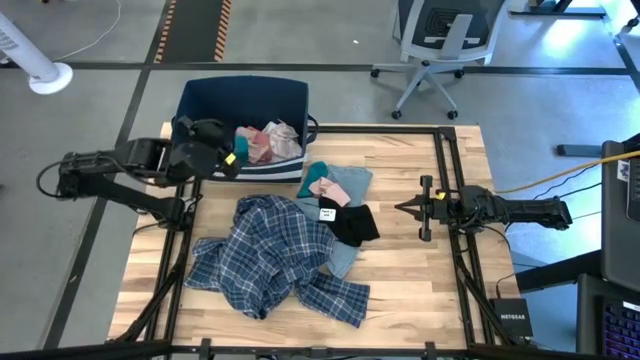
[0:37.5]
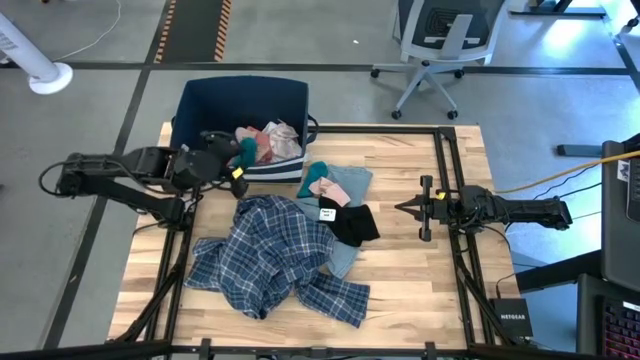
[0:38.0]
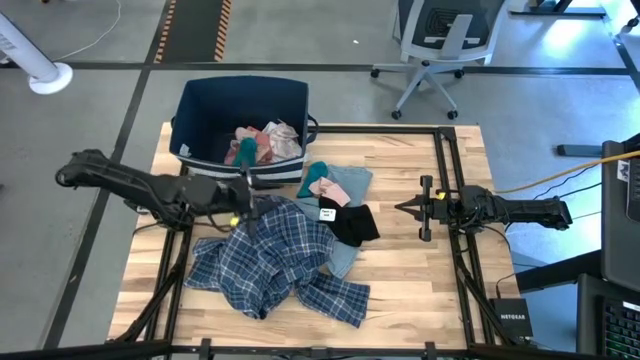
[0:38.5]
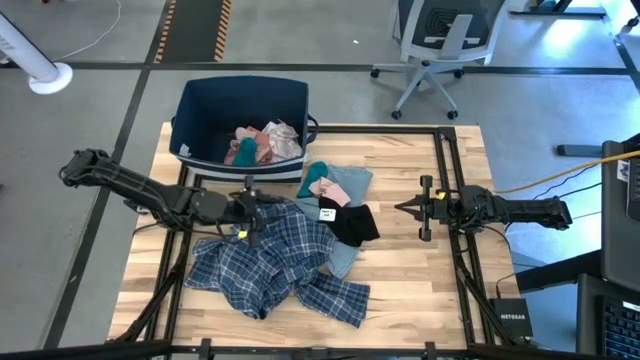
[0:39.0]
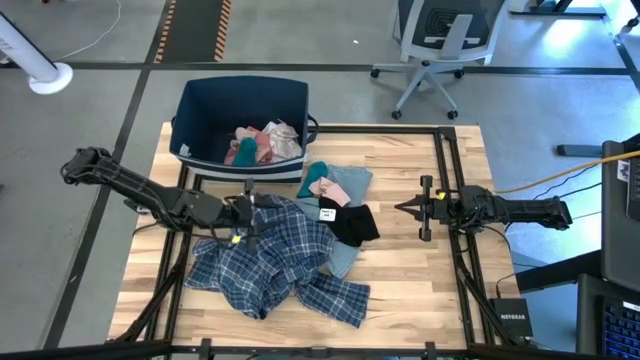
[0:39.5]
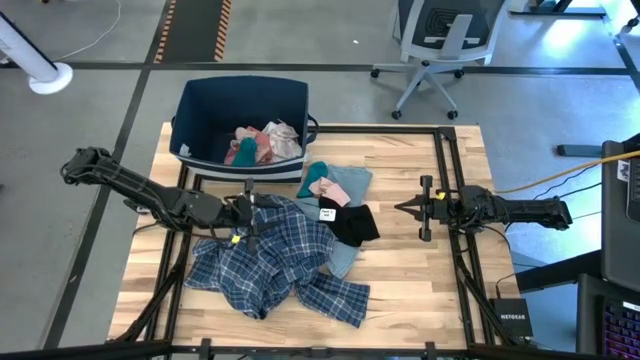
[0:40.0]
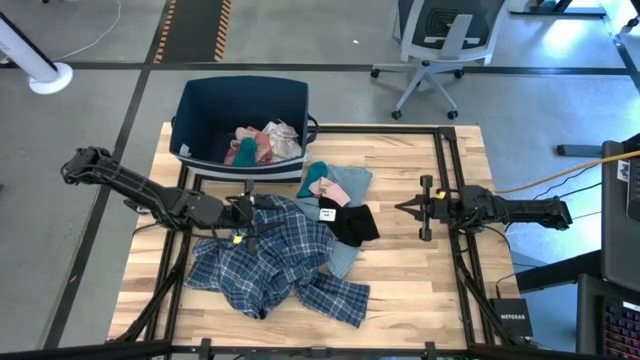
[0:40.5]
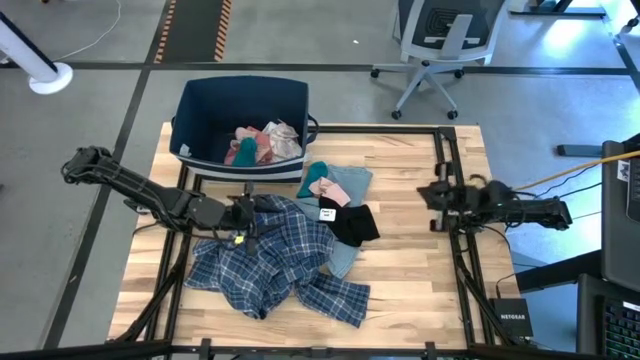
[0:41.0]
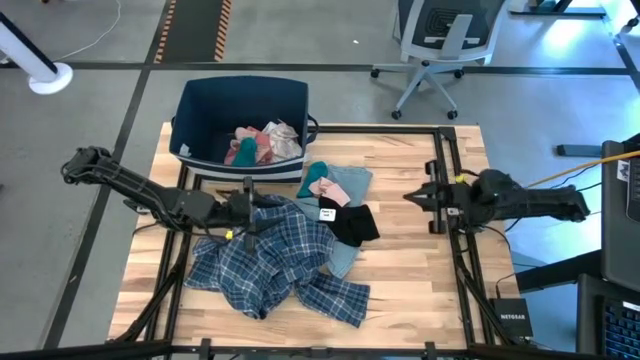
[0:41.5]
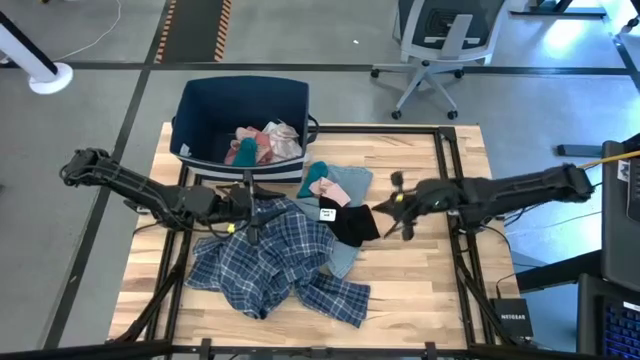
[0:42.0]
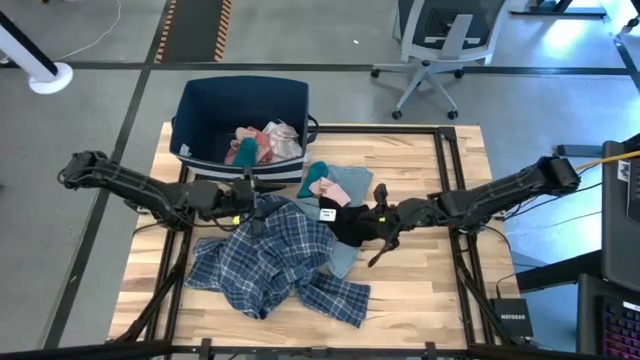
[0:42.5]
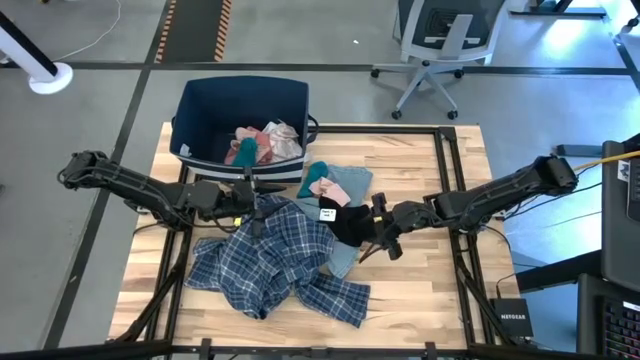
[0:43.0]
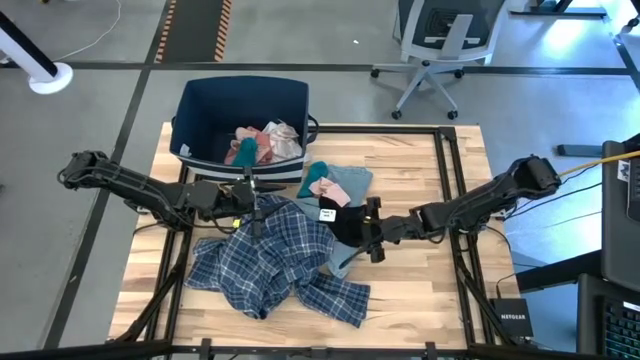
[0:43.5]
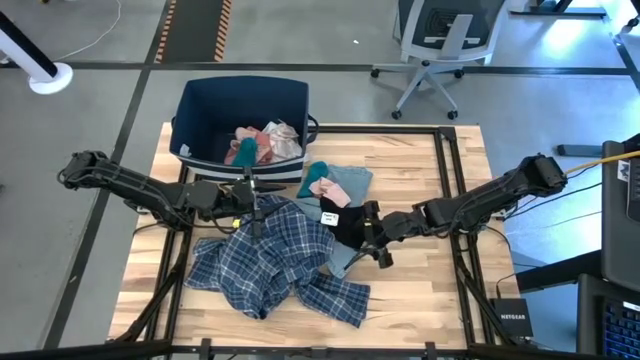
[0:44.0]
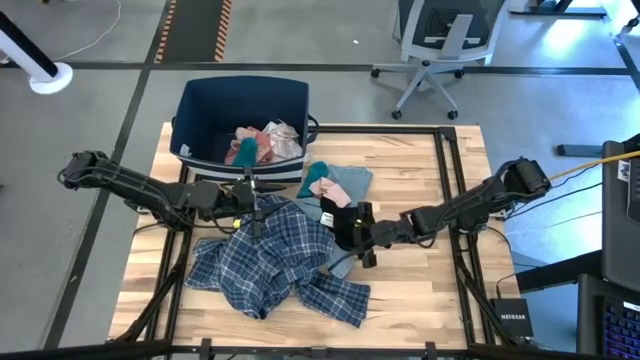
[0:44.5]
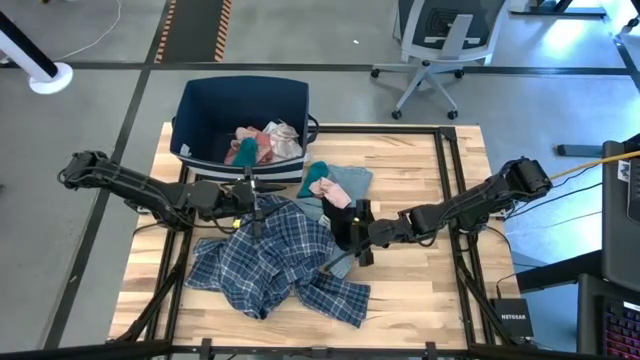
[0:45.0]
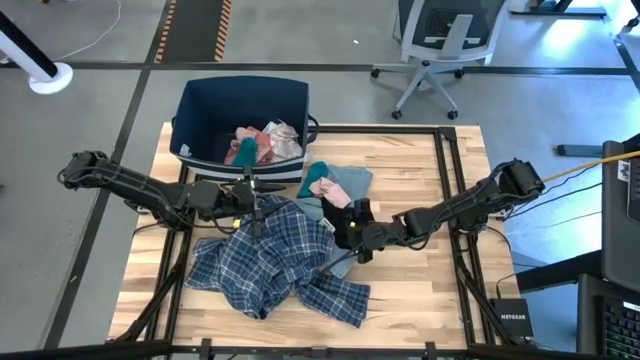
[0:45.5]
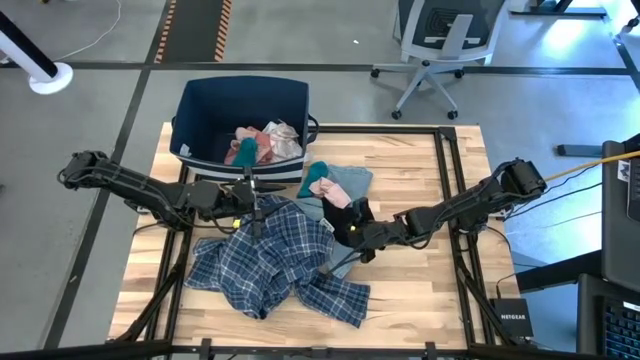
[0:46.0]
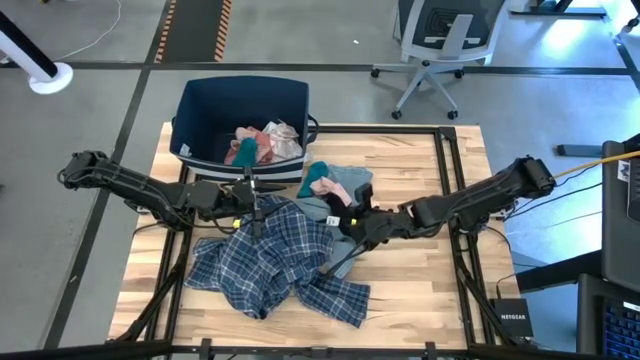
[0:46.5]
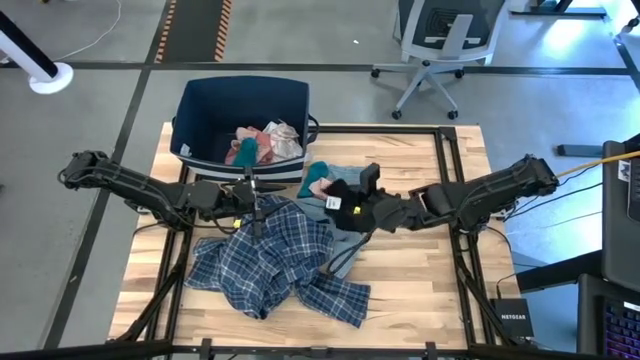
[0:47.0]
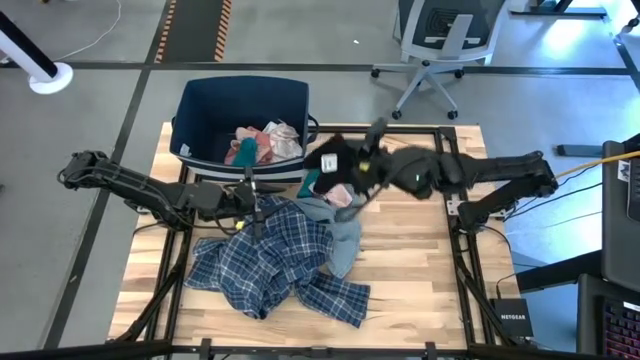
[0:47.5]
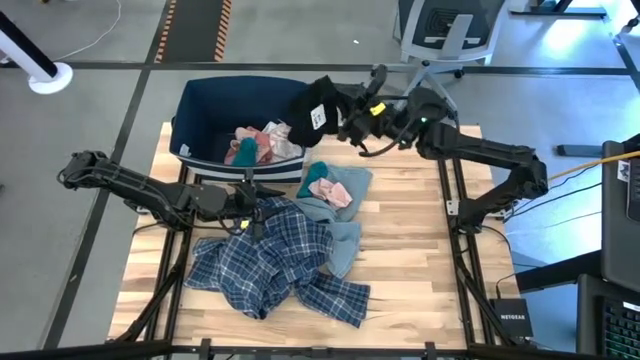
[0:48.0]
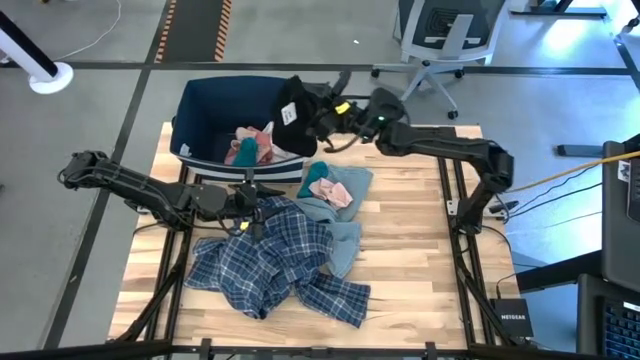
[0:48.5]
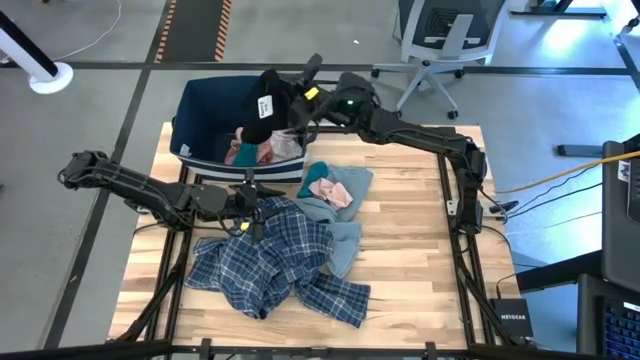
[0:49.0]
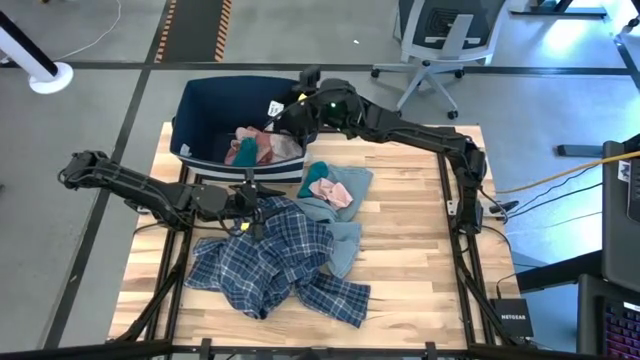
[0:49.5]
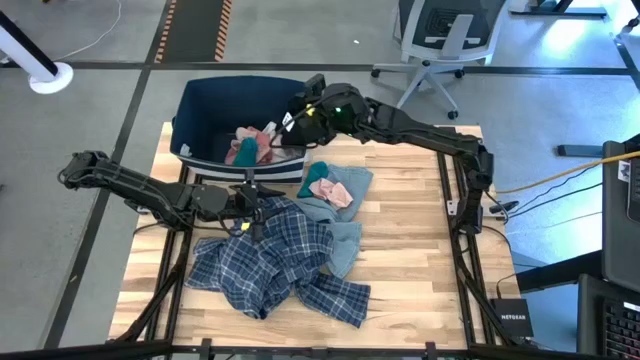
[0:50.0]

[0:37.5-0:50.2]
Task: Sort clothes
Put the black short pants into the blue laundry bin

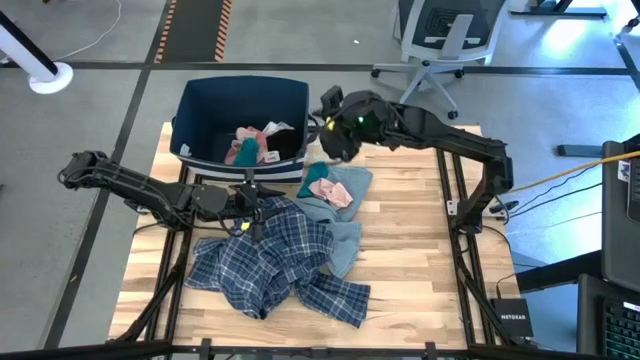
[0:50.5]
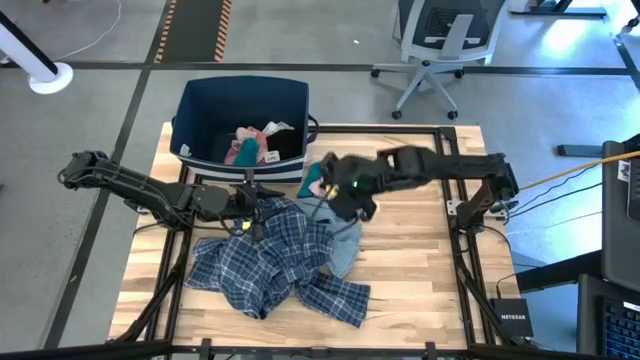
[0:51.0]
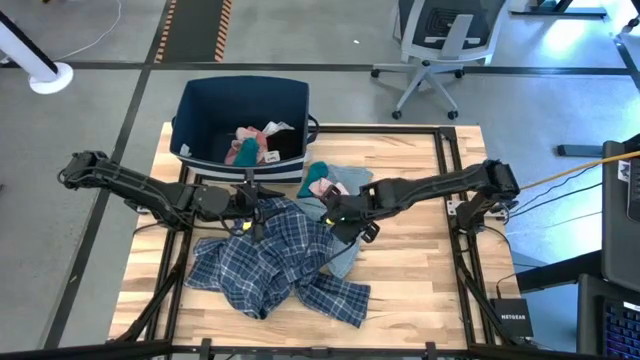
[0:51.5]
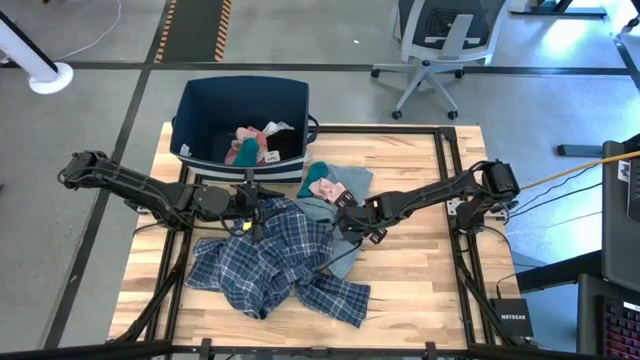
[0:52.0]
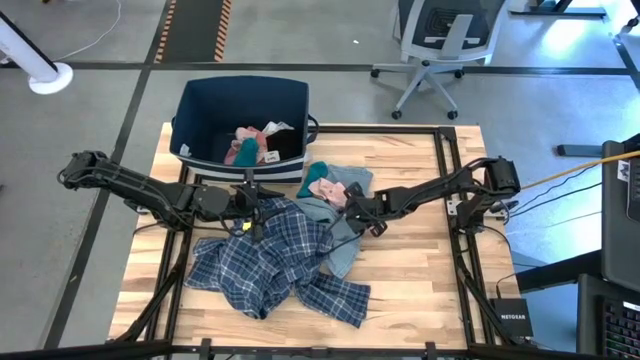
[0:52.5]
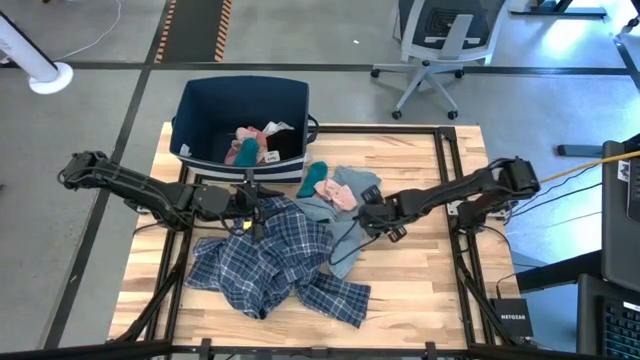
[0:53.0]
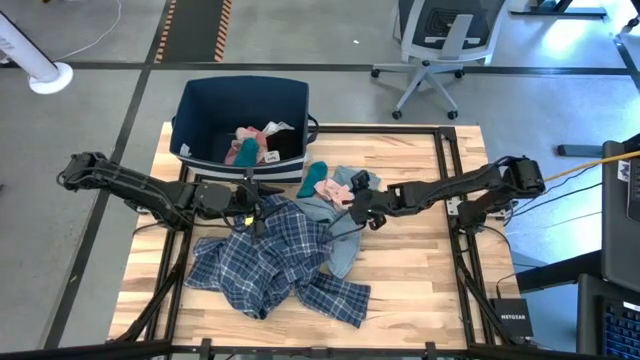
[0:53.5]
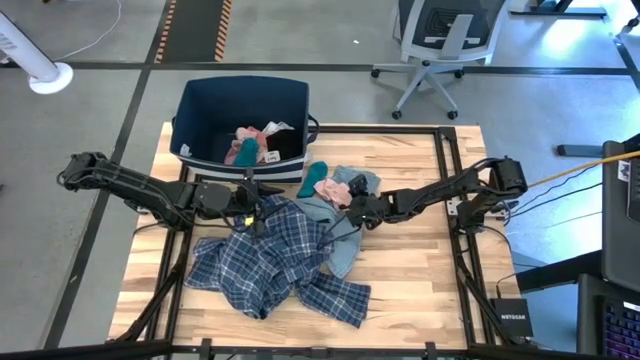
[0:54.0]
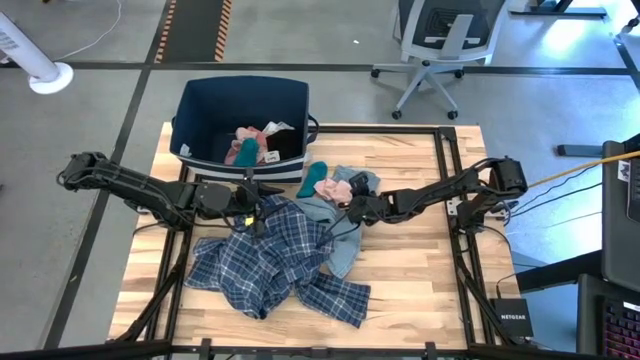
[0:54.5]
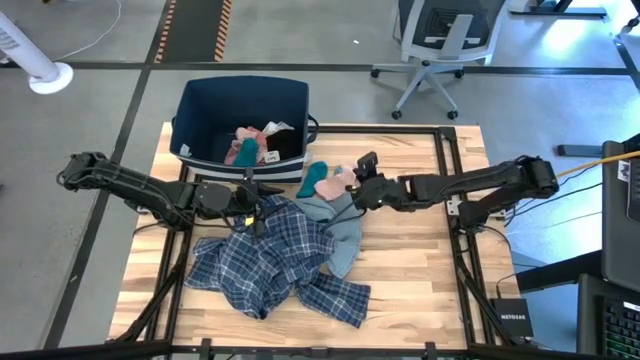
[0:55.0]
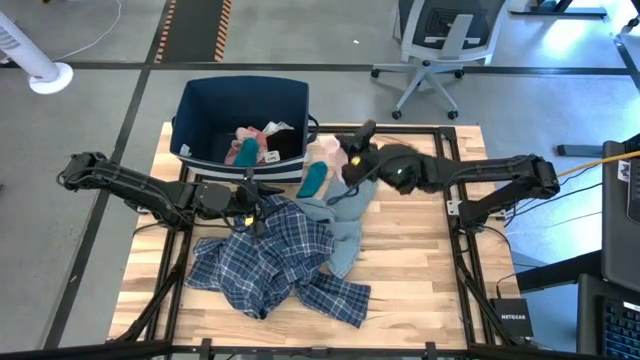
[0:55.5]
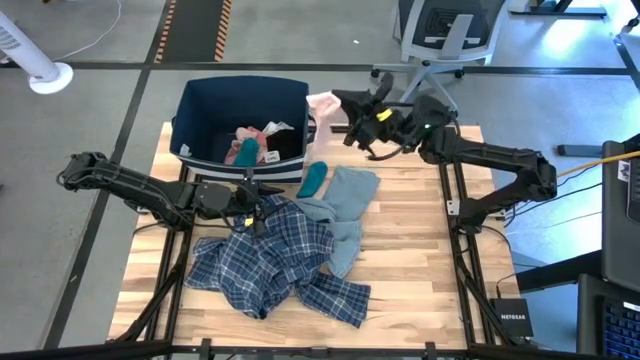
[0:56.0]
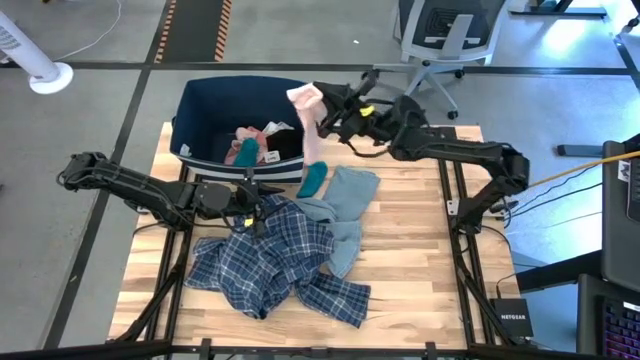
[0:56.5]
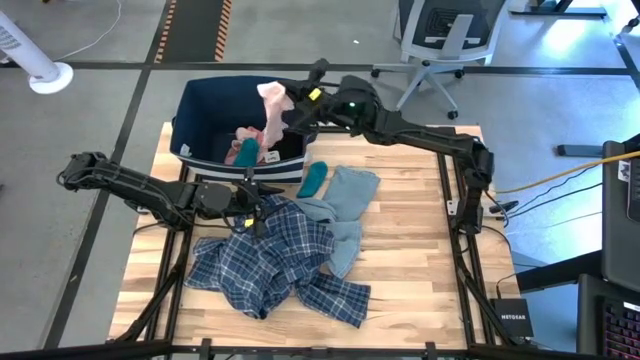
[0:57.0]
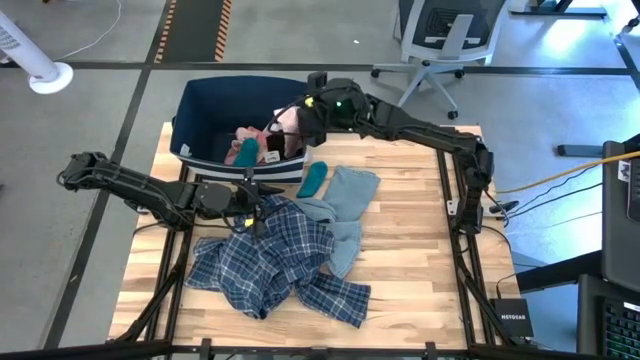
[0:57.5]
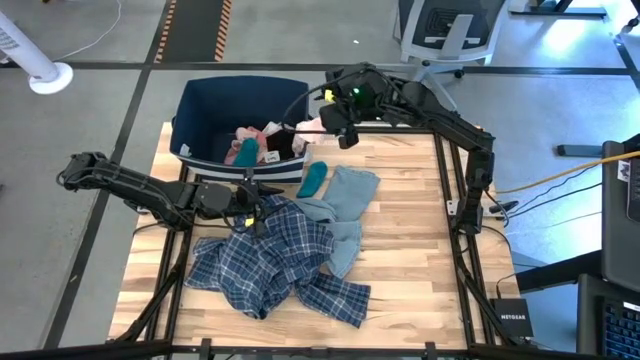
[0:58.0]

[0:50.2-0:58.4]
Put the light orange sock into the blue laundry bin
